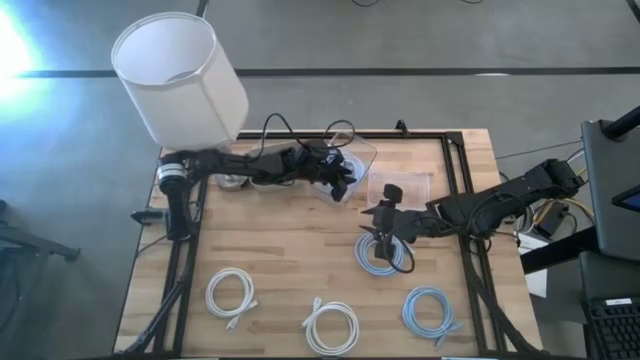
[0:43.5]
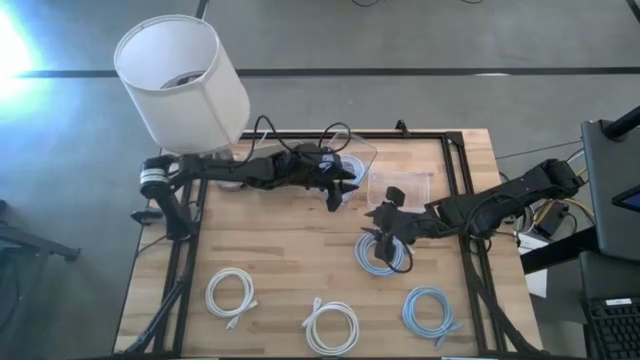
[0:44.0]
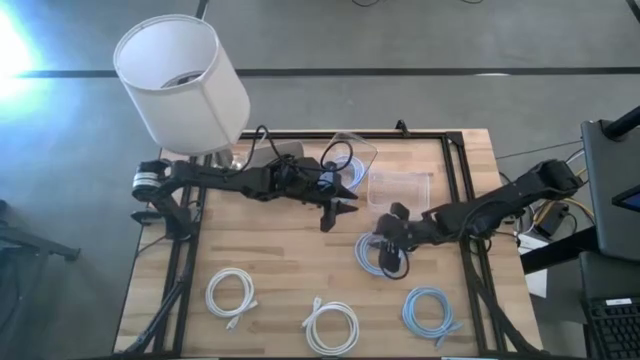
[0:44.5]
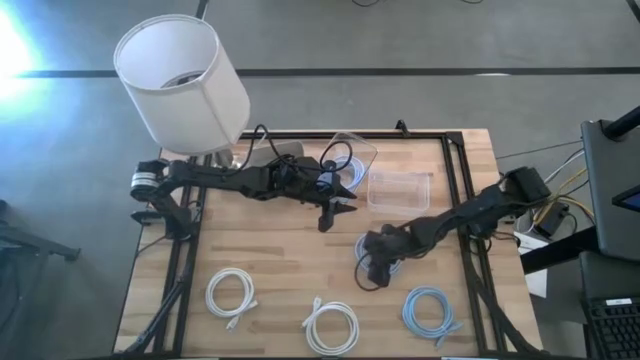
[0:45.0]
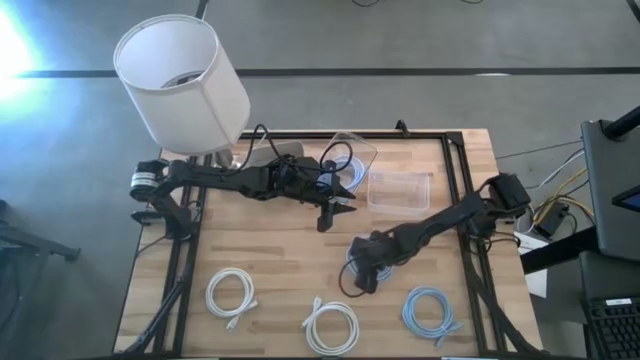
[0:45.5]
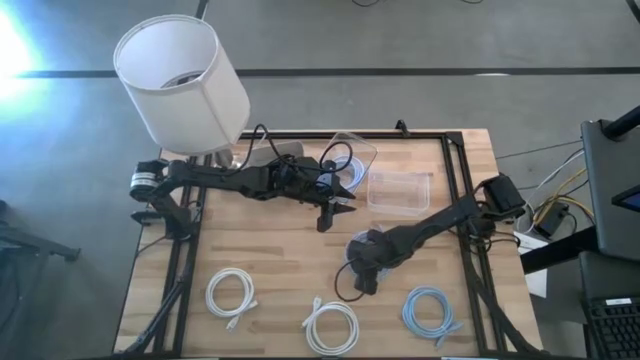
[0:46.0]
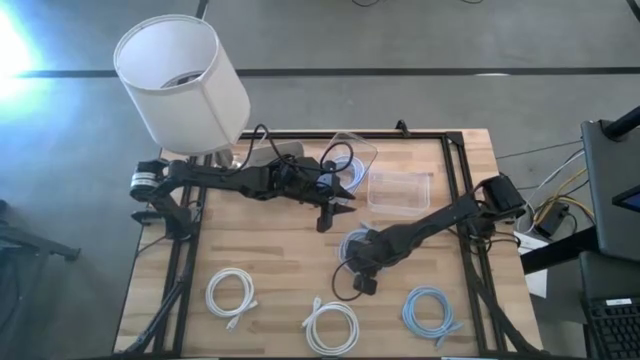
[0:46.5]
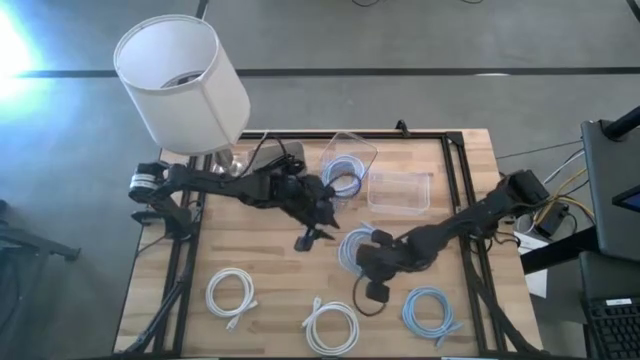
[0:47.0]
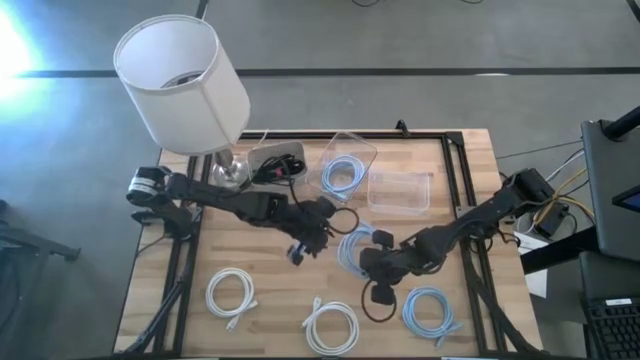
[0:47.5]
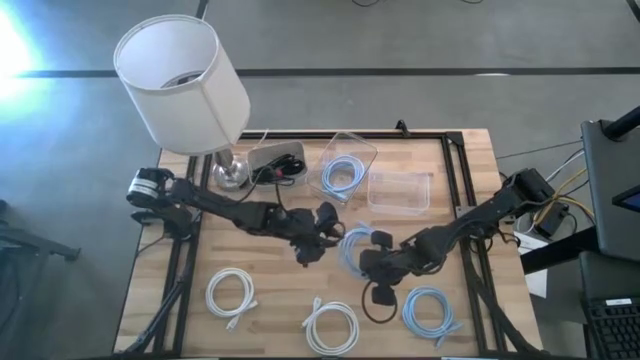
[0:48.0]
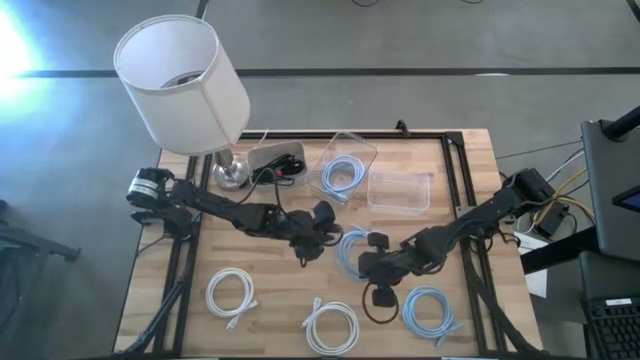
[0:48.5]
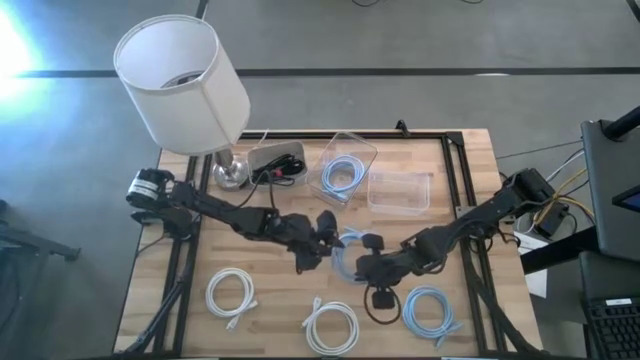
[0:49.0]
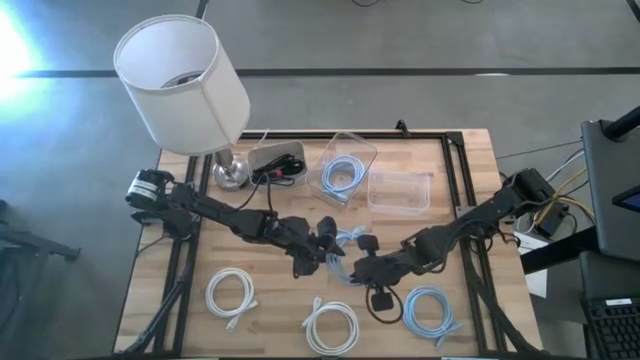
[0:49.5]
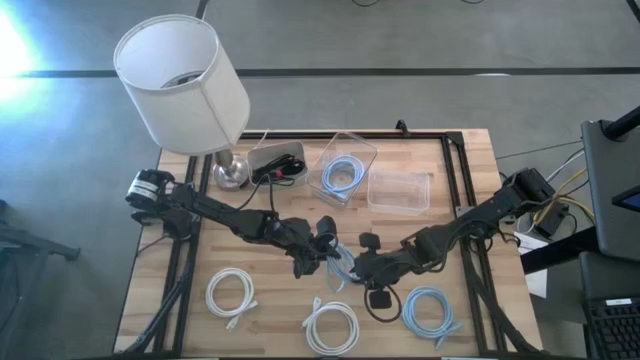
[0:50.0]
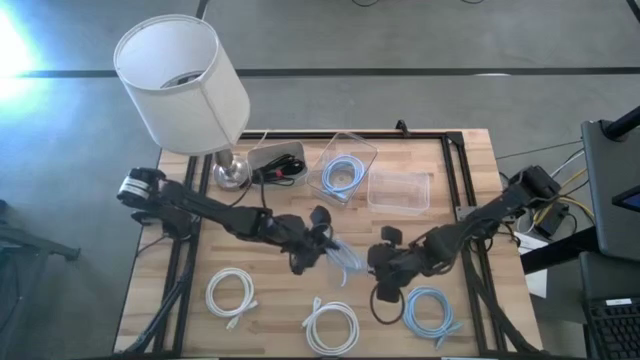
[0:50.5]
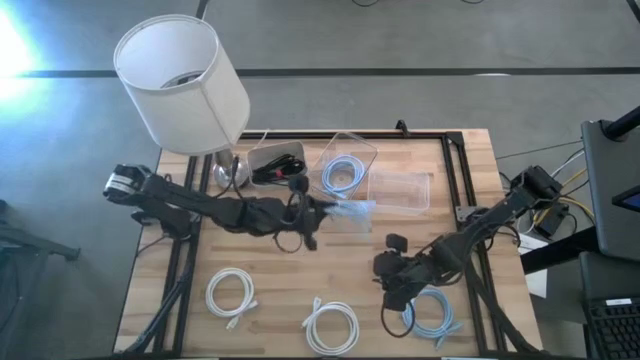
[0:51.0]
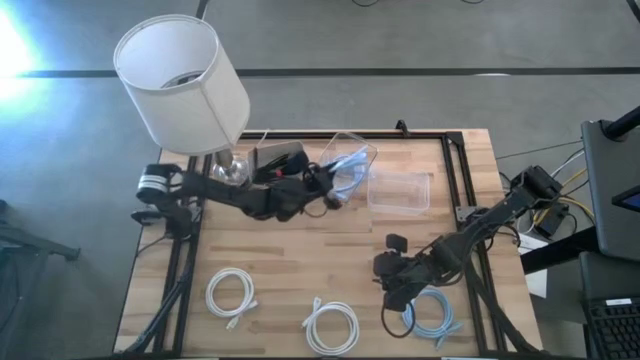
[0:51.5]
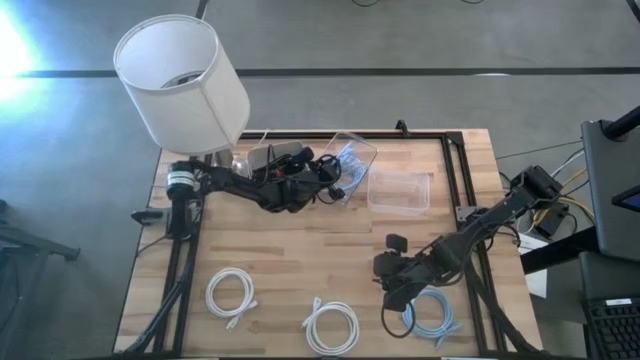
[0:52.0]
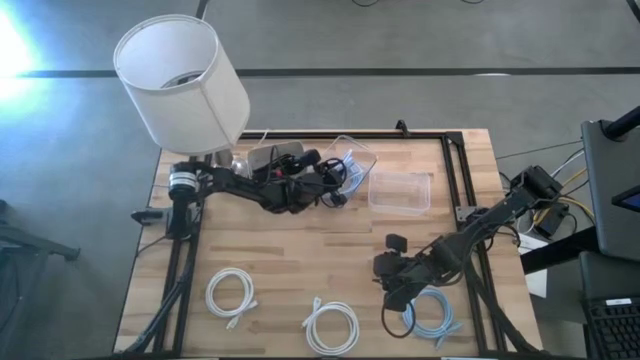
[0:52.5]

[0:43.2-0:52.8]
Task: Pick & Place USB Port
Put the top blue USB cable into the left transparent bin

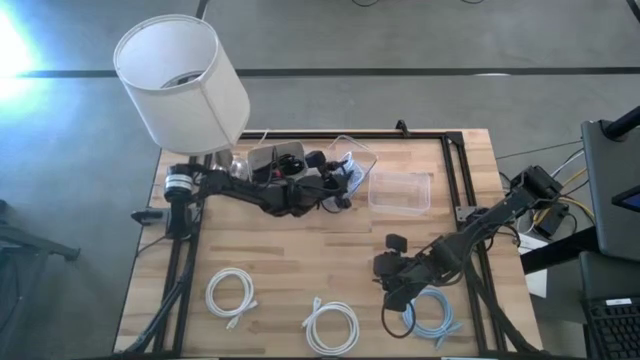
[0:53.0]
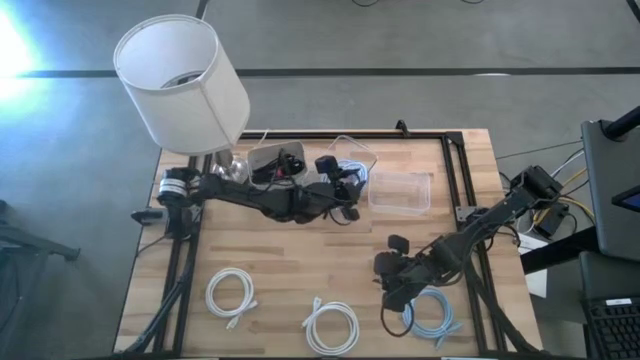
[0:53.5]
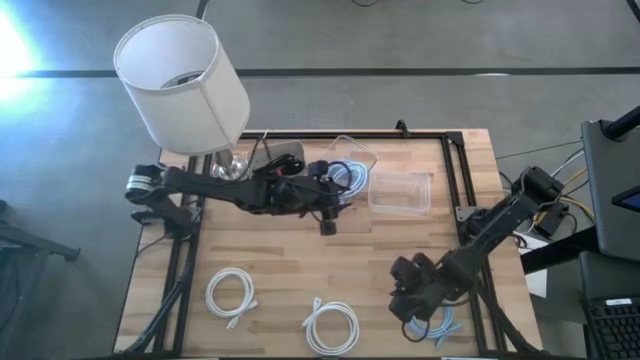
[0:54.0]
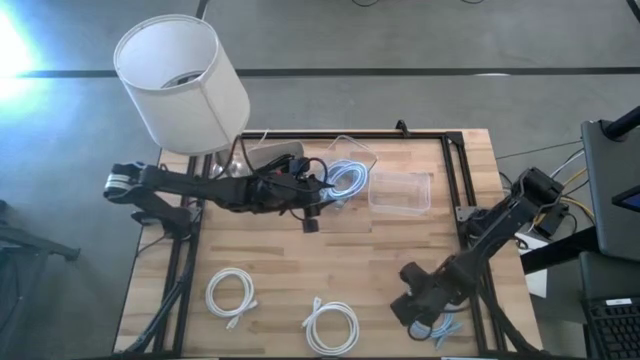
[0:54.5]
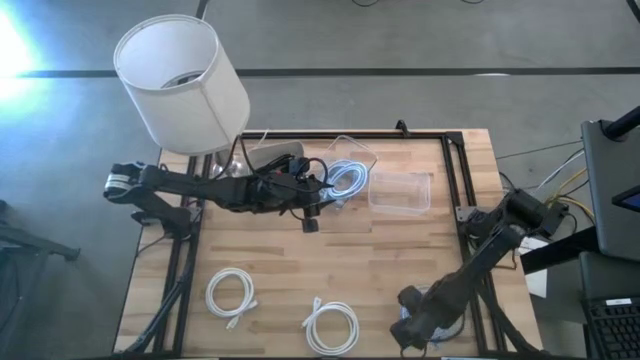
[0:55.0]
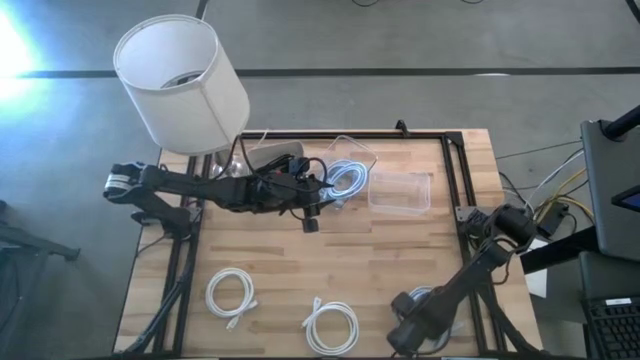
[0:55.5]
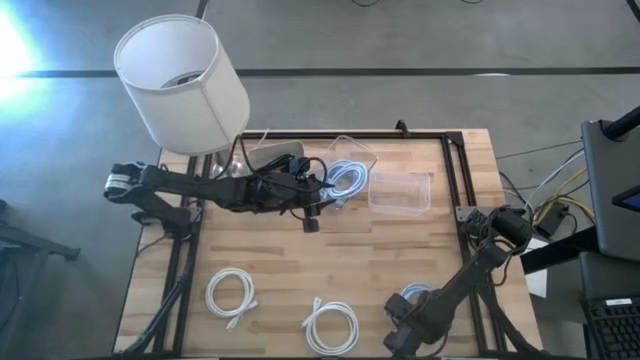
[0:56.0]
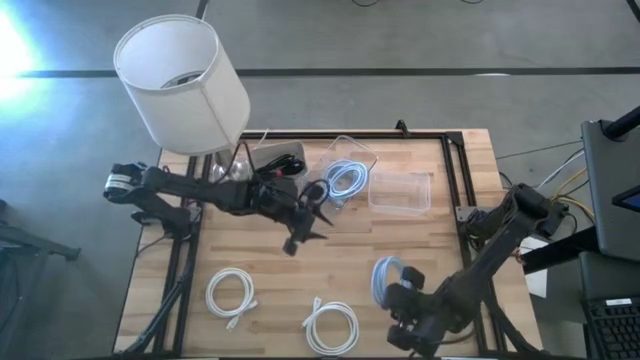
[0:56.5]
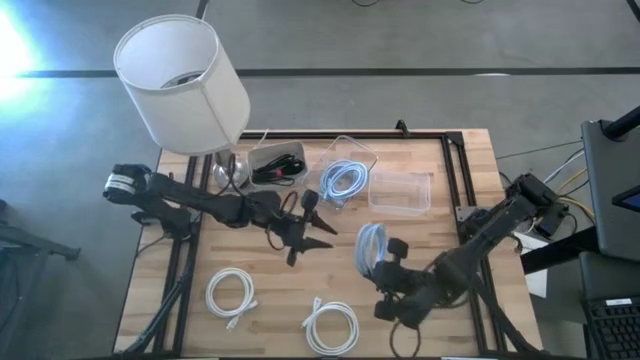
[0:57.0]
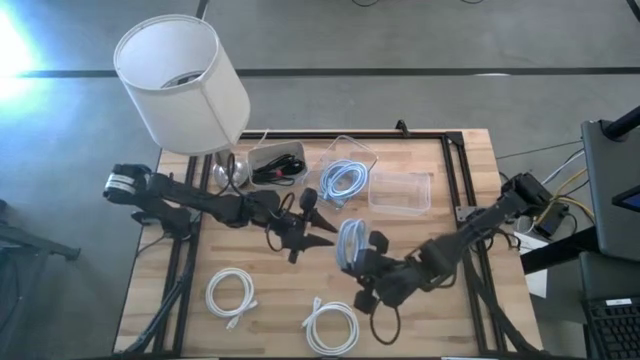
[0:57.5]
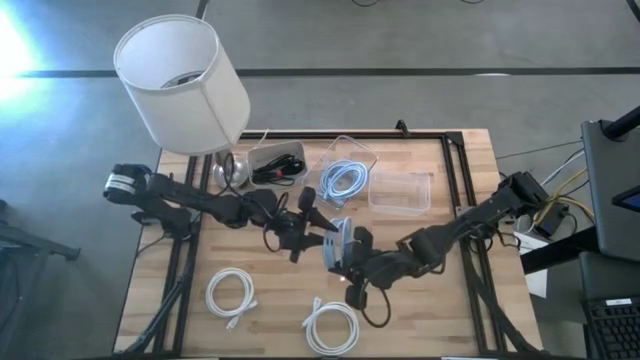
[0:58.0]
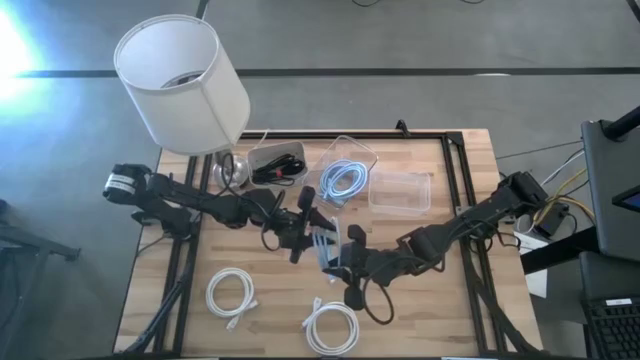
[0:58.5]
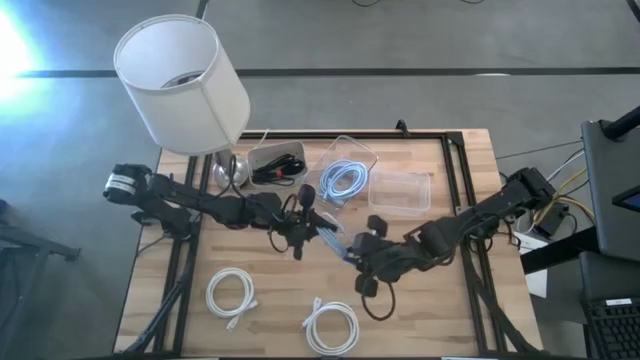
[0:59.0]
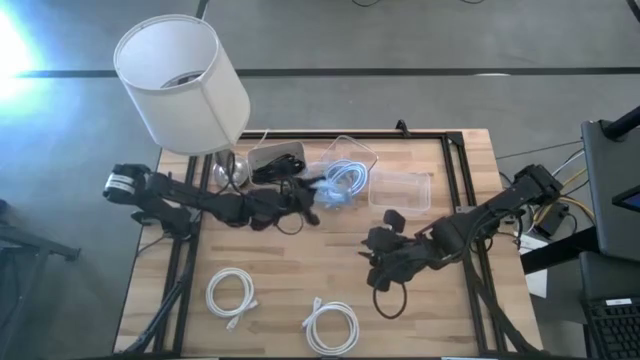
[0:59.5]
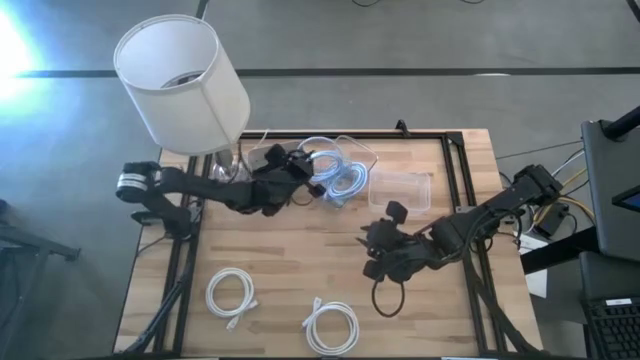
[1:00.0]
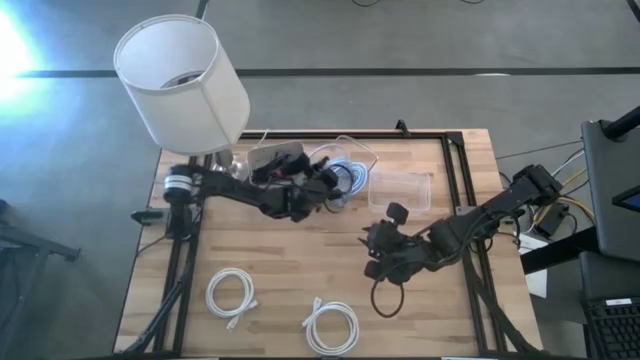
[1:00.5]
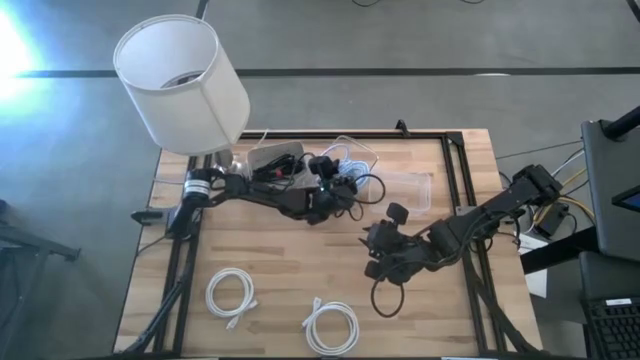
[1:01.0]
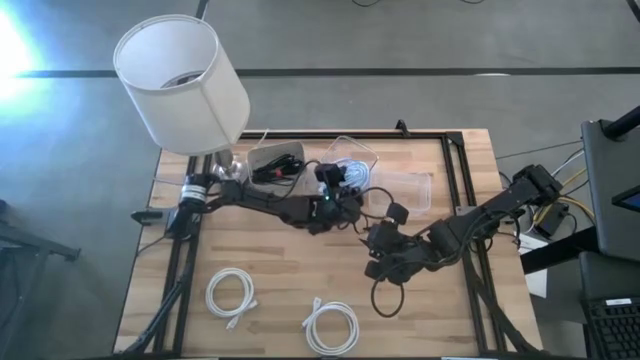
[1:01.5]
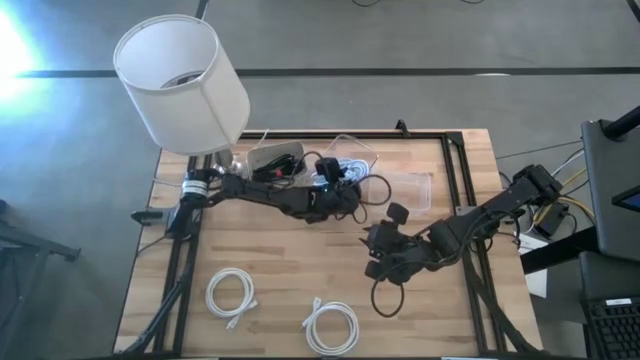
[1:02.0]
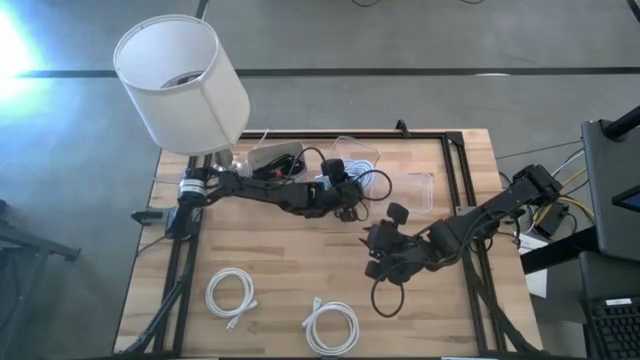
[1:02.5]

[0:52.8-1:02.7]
Put the blue USB cable into the left transparent bin

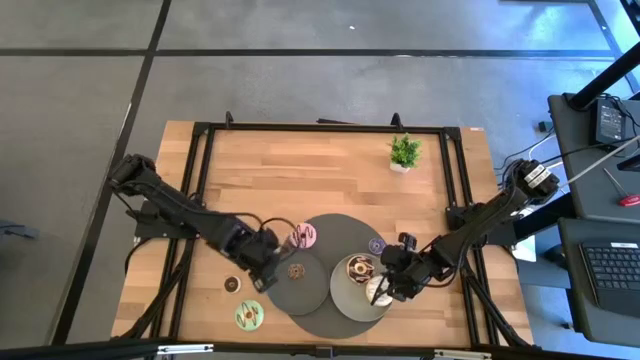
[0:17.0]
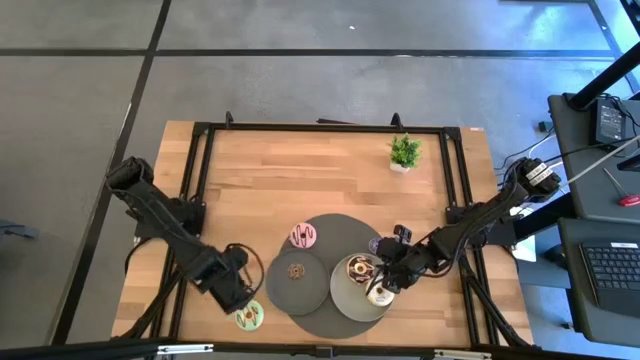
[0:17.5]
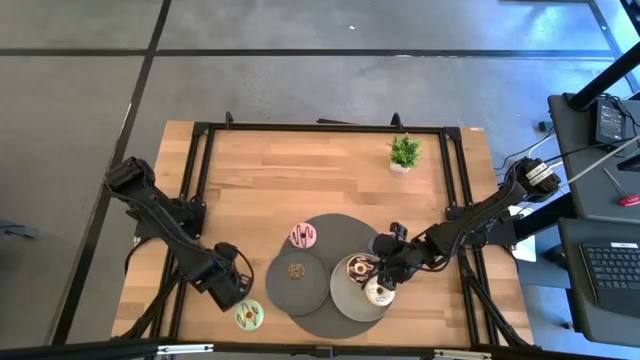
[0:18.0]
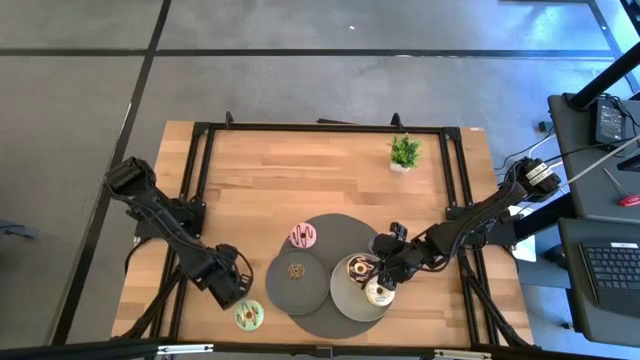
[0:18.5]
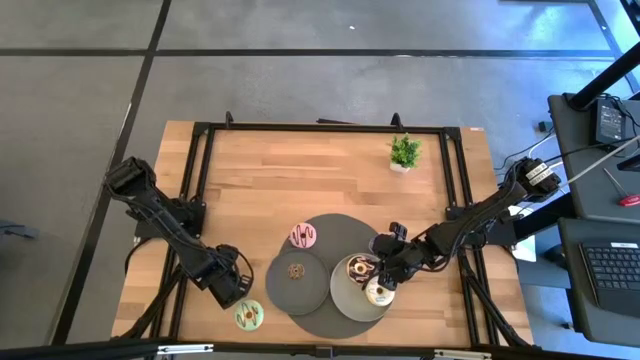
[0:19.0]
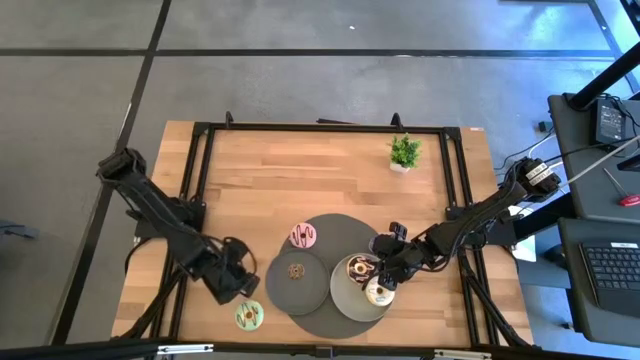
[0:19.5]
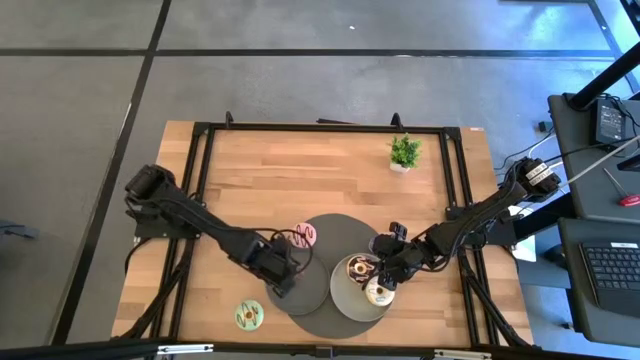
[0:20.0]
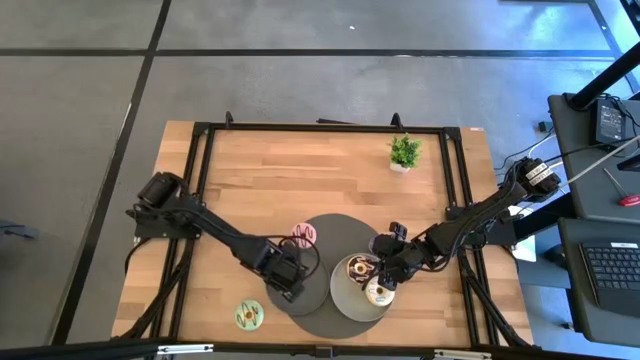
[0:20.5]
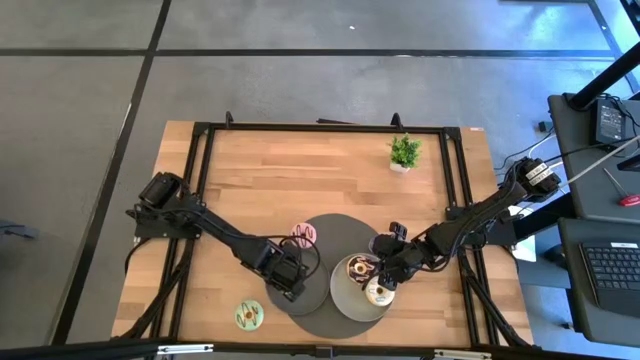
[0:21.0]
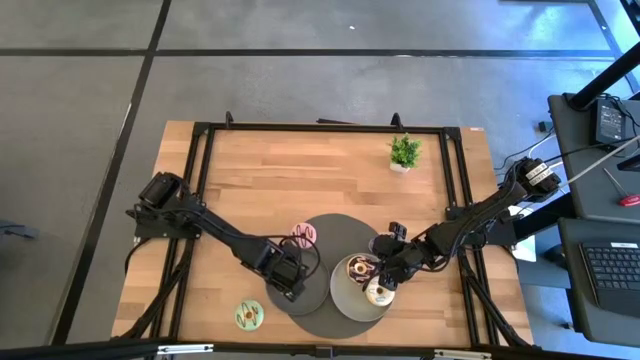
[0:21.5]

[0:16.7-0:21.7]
Task: Pick & Place donuts
Put the small dark brown donut on the black plate
